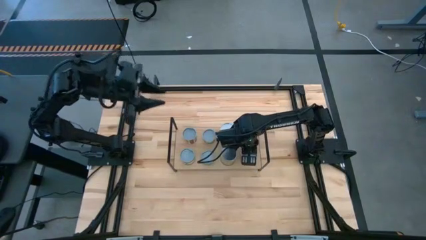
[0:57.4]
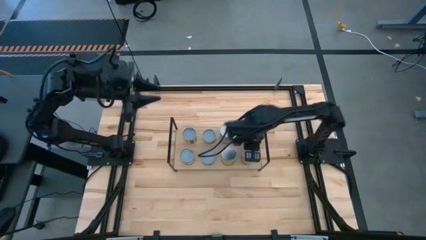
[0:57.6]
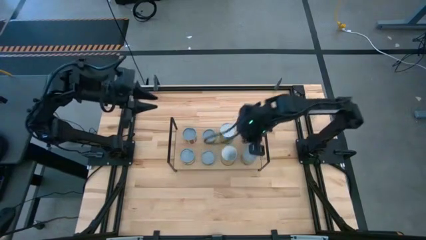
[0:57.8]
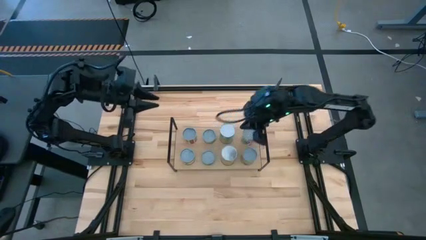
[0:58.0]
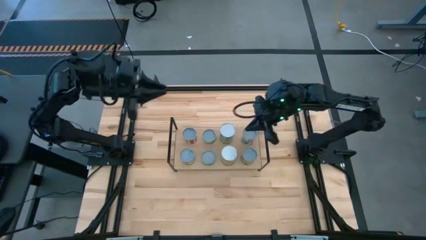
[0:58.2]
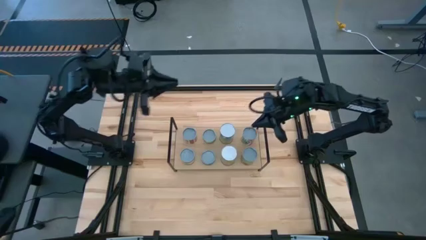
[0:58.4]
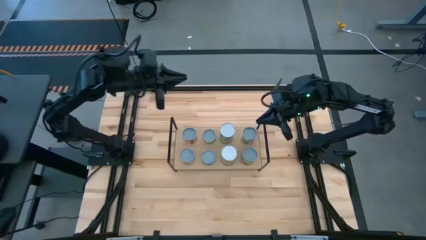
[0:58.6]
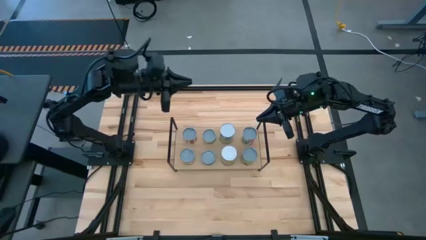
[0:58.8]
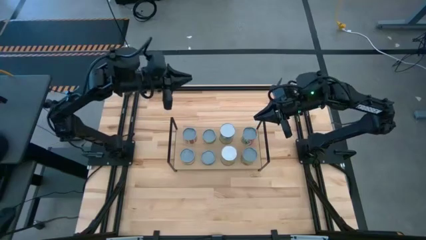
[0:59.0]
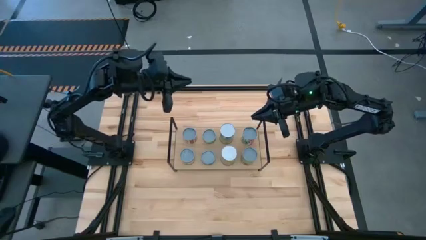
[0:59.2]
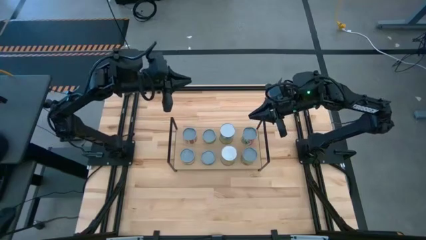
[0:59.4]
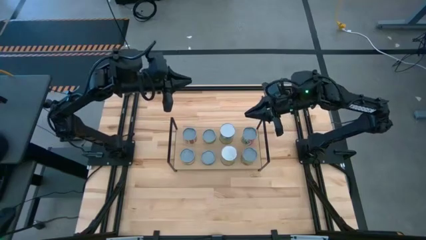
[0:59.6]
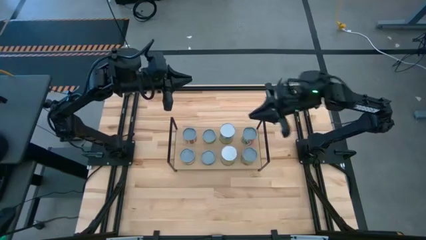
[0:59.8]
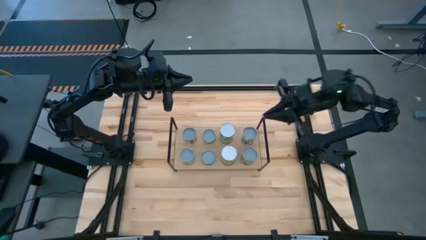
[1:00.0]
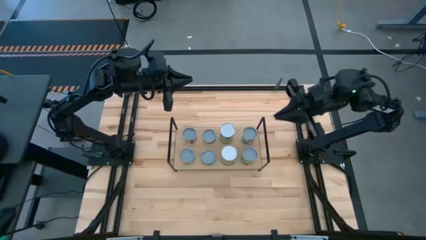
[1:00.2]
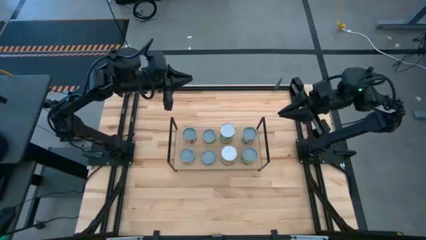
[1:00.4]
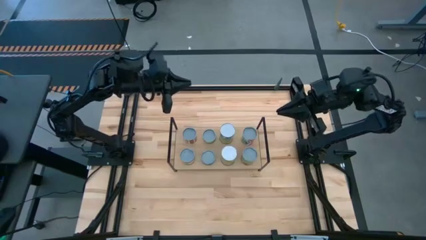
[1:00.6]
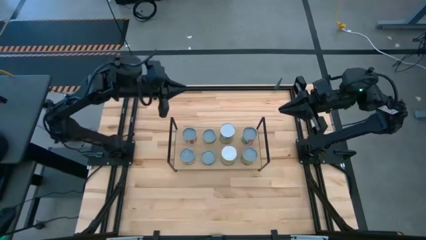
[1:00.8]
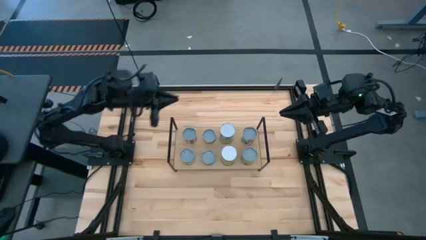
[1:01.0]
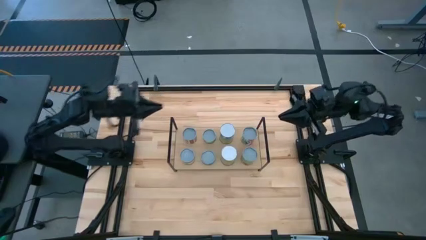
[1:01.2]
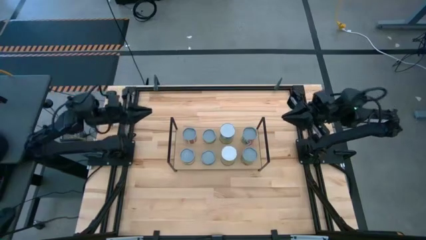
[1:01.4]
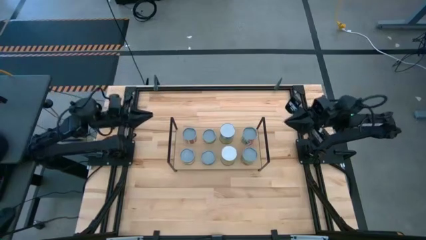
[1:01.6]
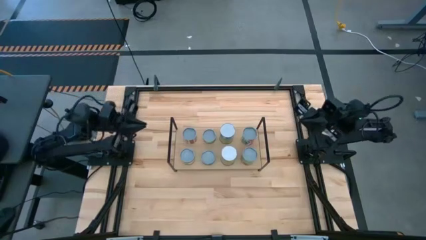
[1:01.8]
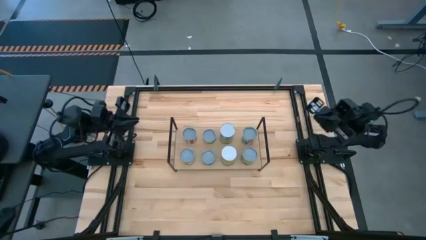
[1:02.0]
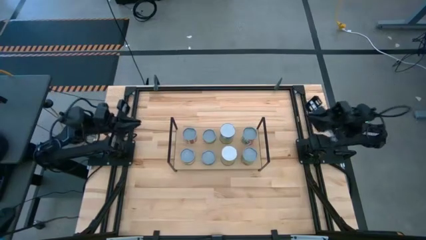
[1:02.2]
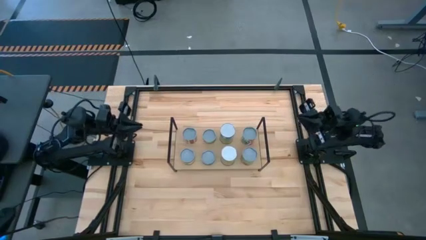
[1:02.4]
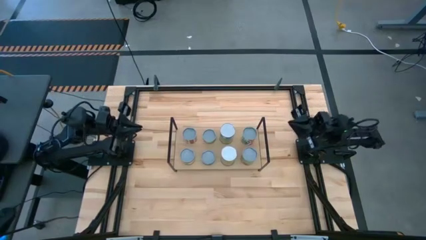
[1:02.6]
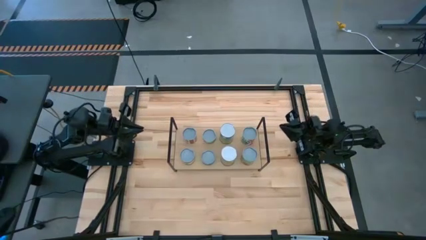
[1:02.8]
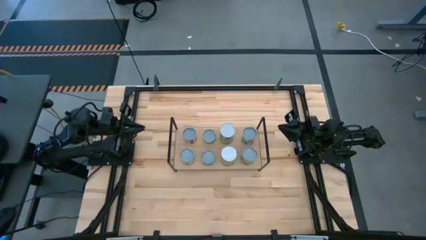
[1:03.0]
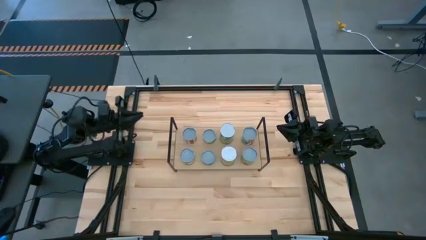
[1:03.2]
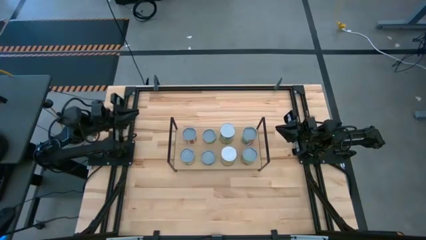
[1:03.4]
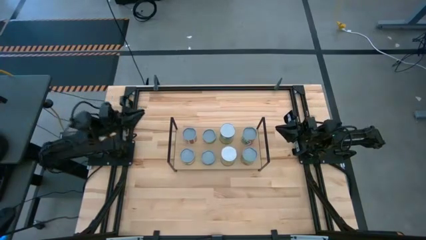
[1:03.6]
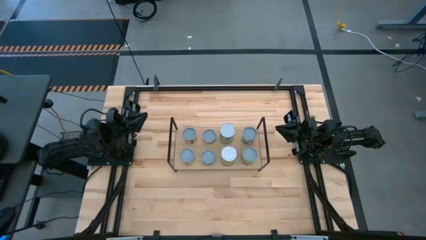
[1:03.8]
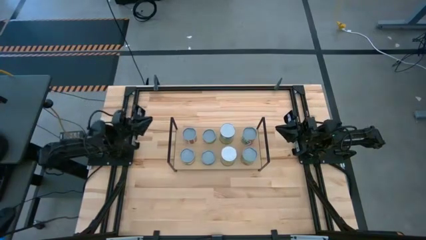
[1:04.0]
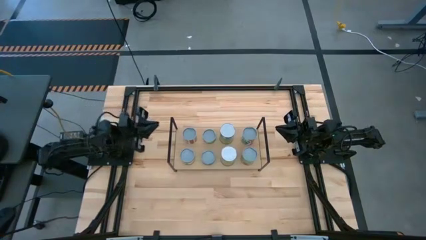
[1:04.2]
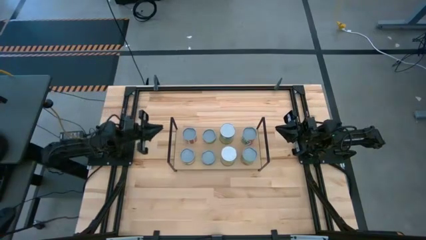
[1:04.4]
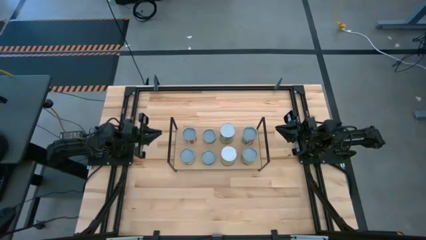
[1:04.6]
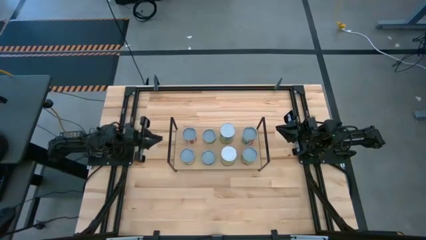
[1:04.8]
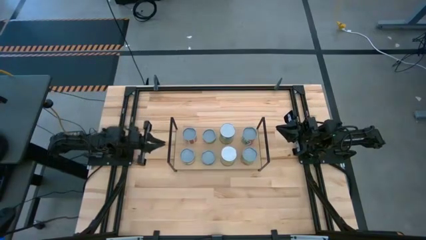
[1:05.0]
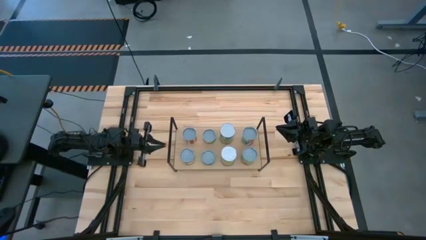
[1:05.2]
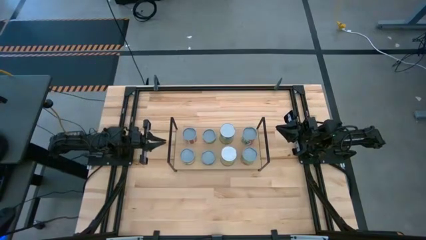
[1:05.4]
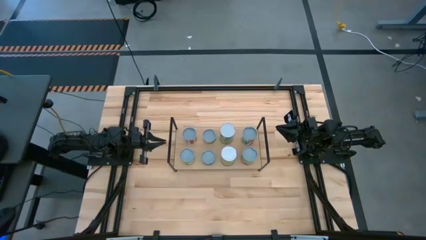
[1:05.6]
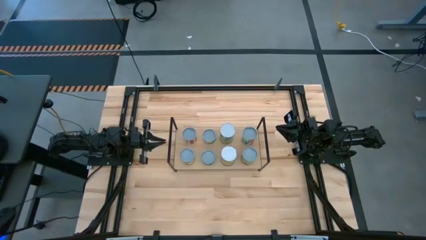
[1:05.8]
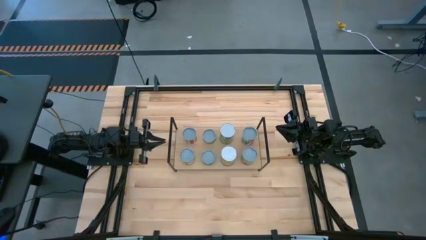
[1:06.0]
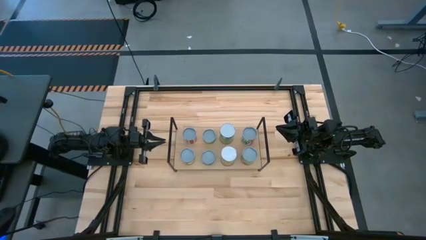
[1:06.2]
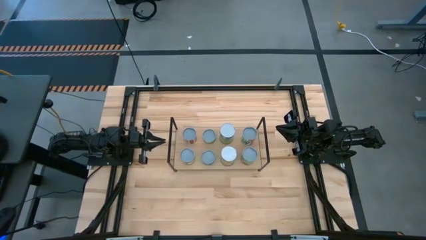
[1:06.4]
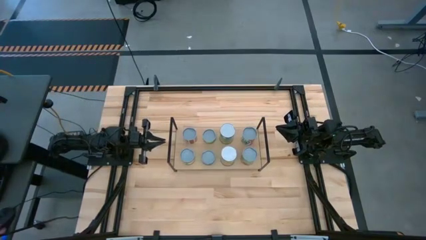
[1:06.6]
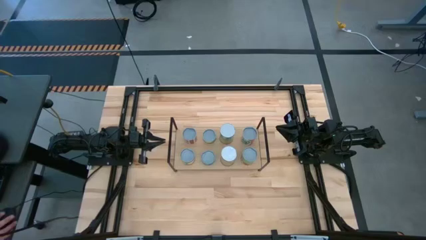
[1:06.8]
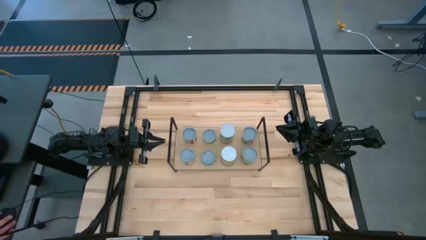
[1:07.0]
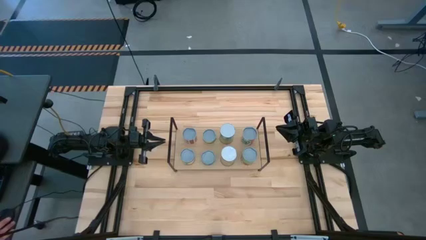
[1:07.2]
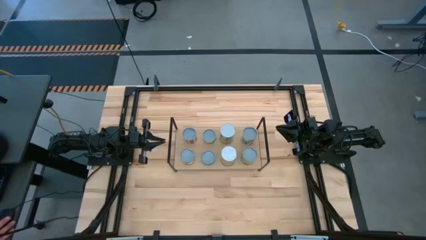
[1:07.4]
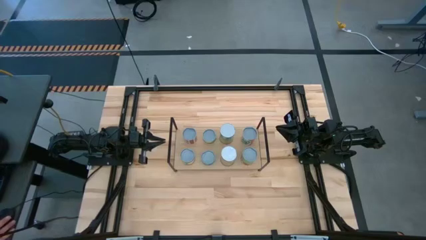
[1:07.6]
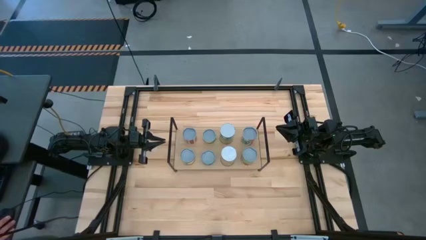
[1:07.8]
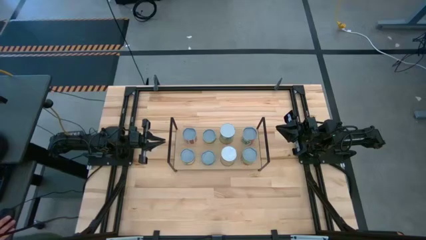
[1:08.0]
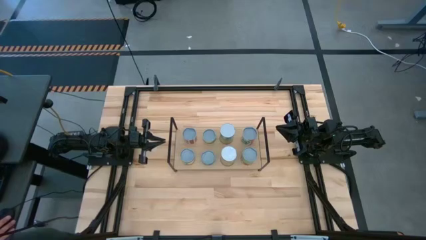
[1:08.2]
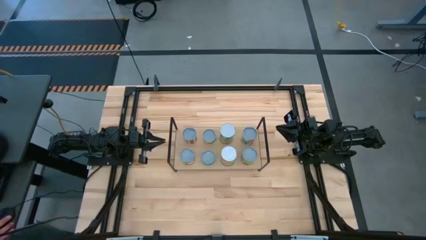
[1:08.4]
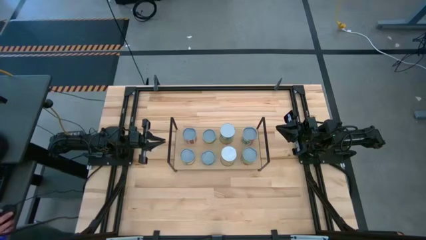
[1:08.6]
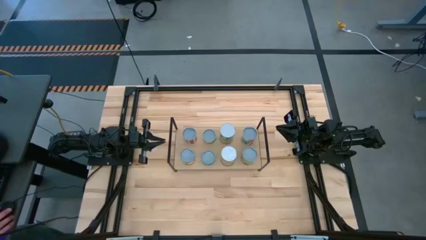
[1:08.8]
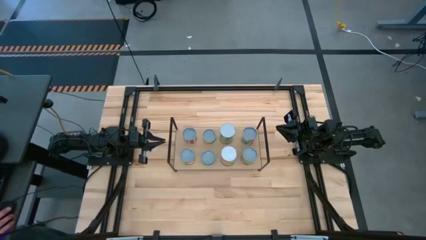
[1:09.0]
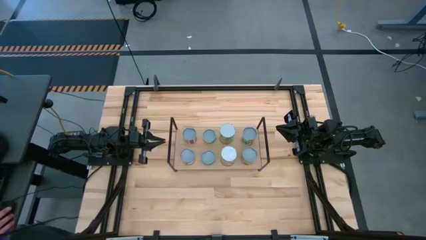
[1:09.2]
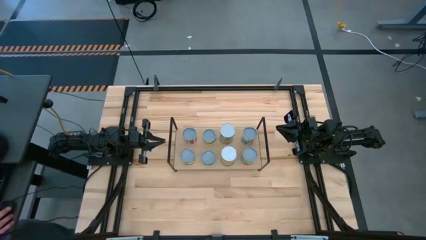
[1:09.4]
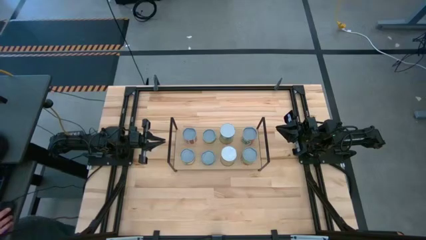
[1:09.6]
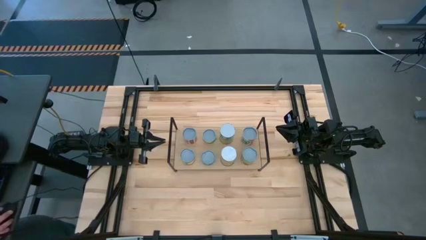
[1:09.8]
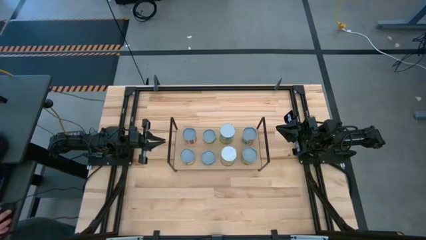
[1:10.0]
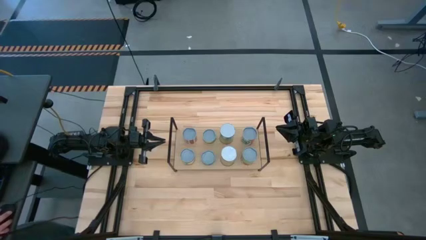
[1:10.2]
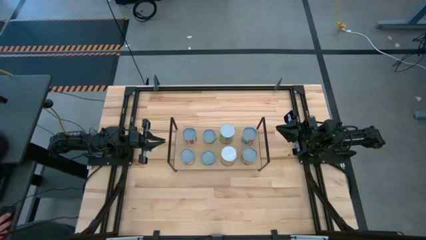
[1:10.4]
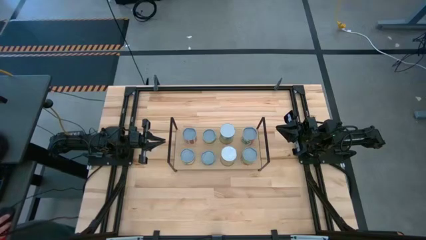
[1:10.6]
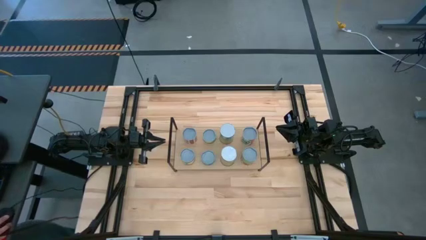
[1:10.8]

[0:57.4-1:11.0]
Task: Pick and place cans onto a shelf
Return to Home Position
